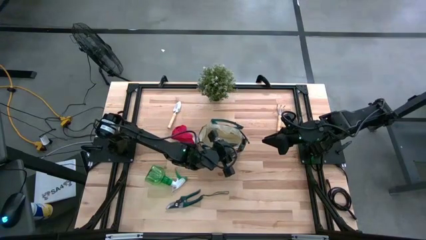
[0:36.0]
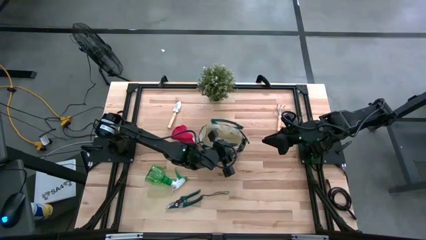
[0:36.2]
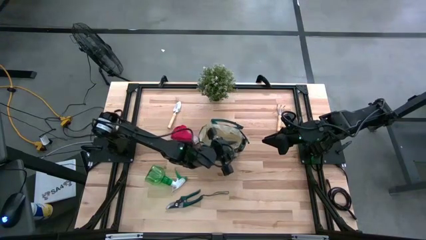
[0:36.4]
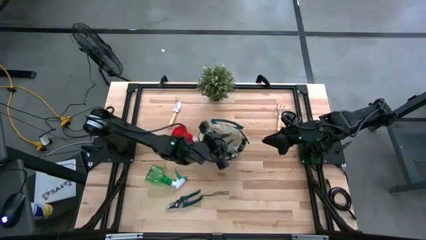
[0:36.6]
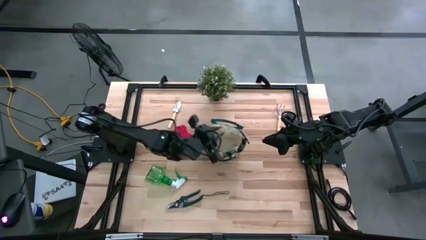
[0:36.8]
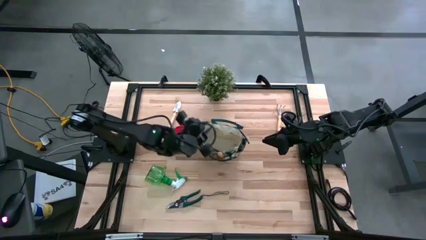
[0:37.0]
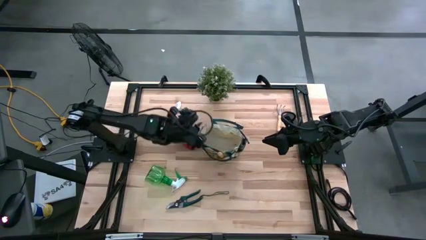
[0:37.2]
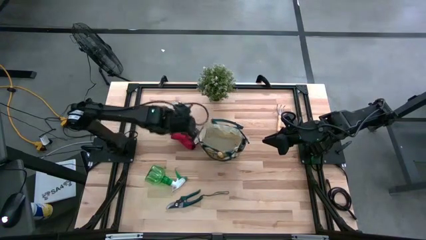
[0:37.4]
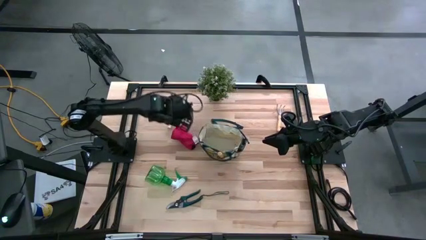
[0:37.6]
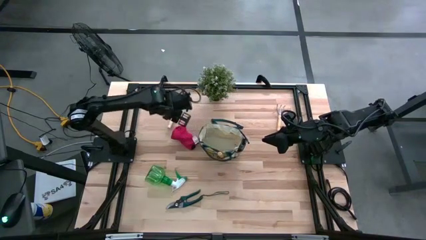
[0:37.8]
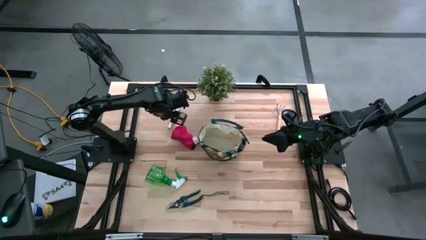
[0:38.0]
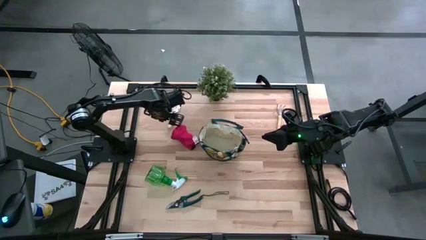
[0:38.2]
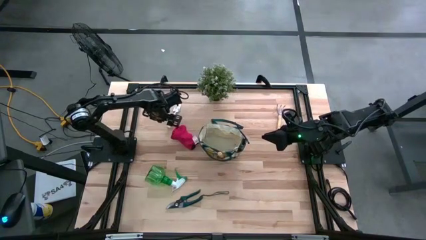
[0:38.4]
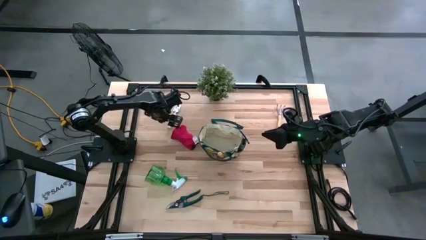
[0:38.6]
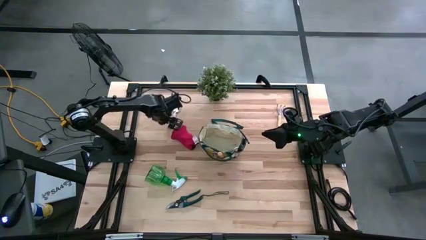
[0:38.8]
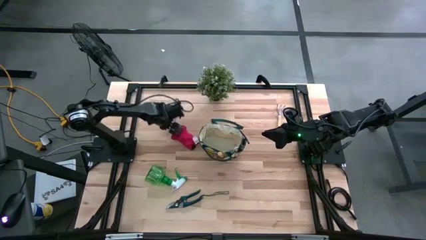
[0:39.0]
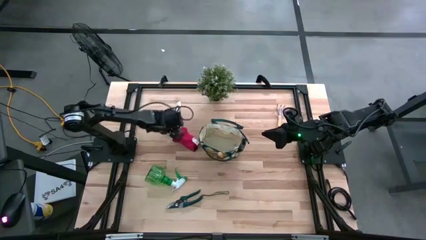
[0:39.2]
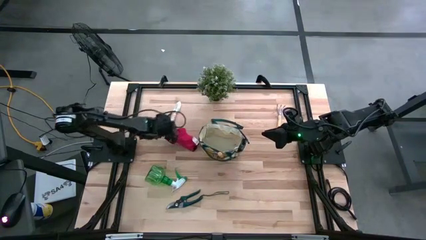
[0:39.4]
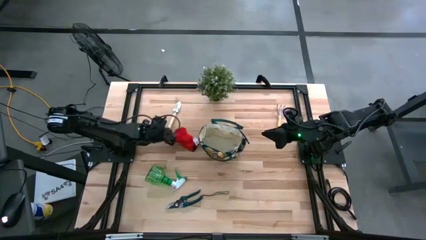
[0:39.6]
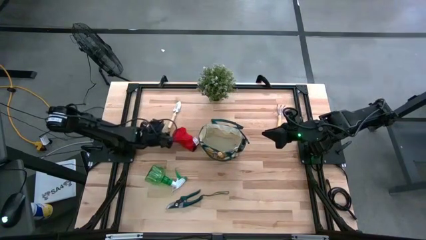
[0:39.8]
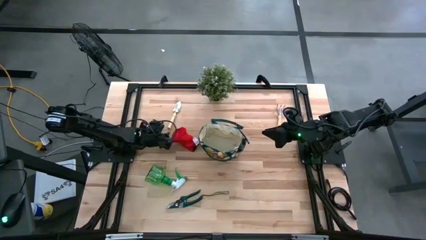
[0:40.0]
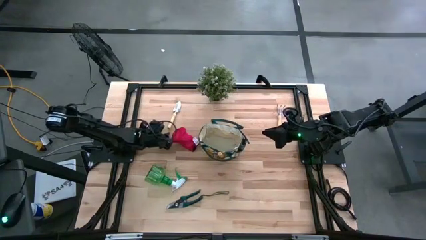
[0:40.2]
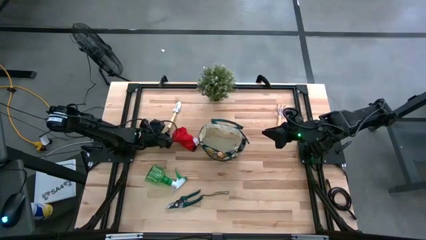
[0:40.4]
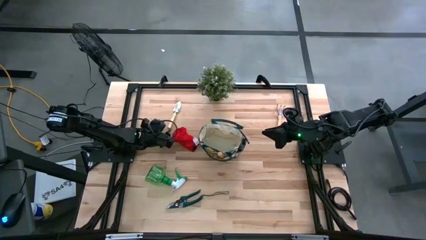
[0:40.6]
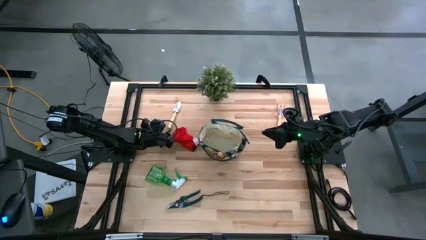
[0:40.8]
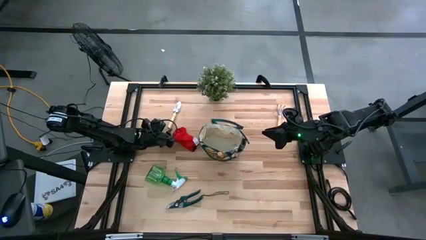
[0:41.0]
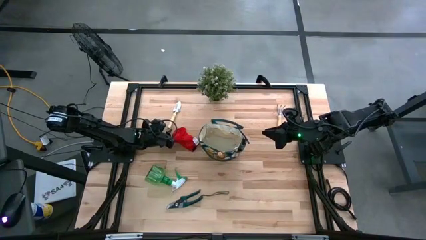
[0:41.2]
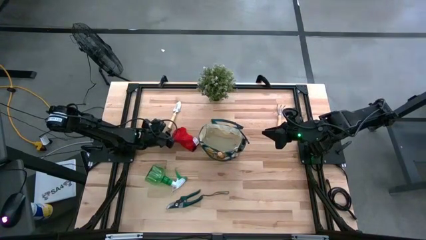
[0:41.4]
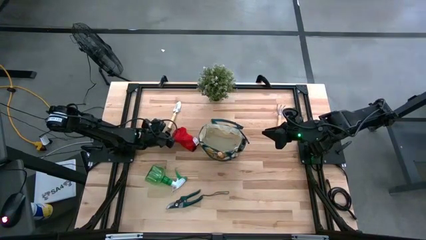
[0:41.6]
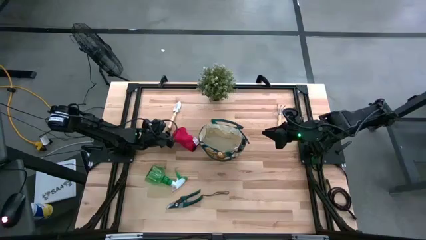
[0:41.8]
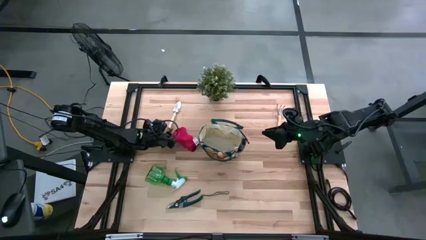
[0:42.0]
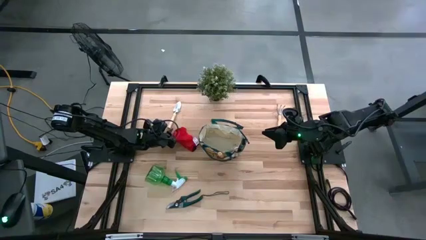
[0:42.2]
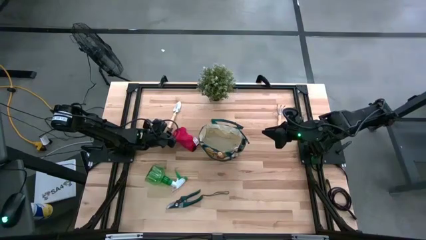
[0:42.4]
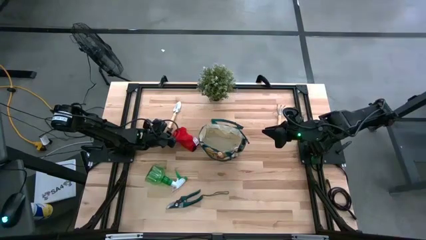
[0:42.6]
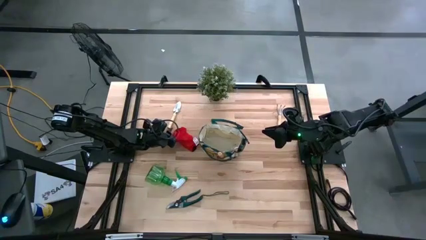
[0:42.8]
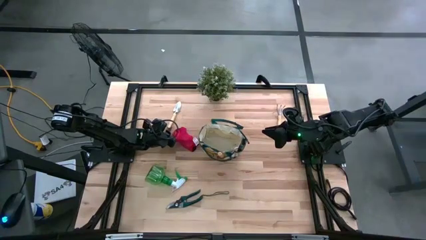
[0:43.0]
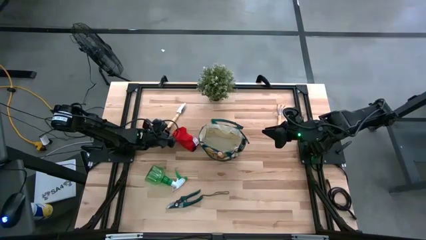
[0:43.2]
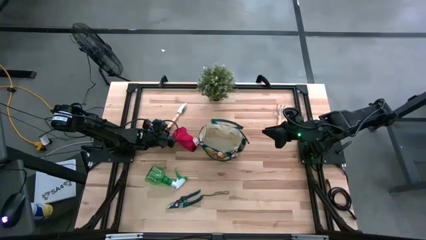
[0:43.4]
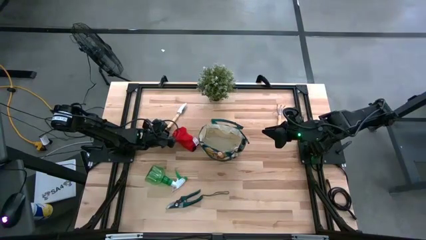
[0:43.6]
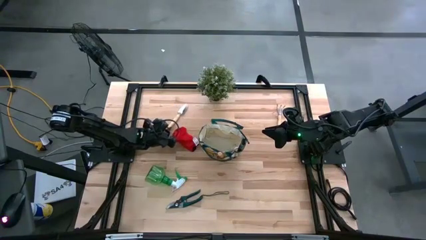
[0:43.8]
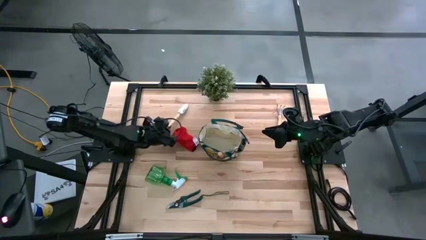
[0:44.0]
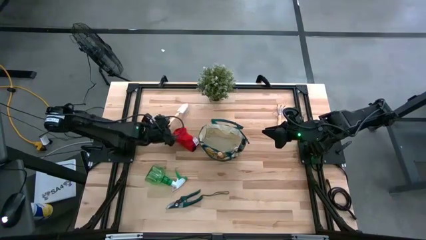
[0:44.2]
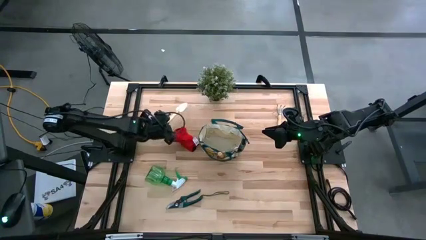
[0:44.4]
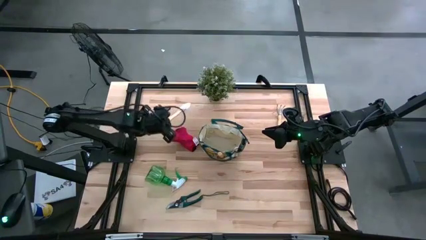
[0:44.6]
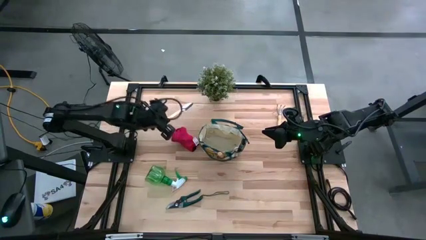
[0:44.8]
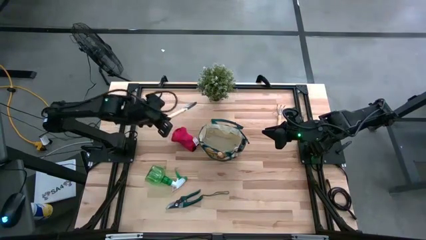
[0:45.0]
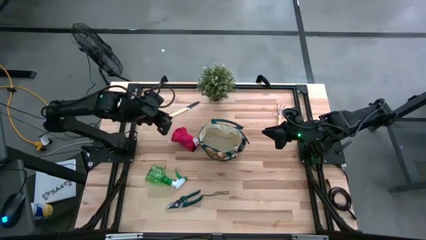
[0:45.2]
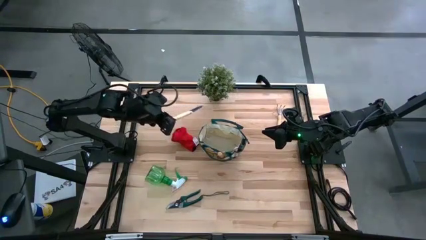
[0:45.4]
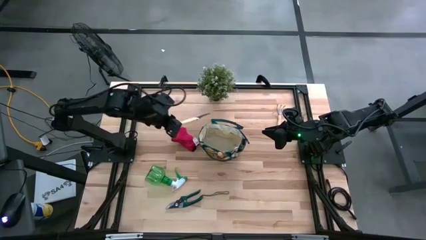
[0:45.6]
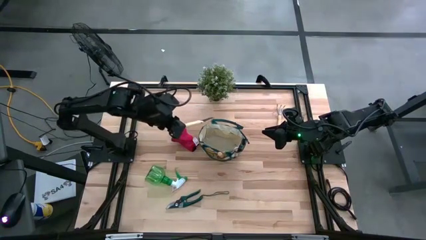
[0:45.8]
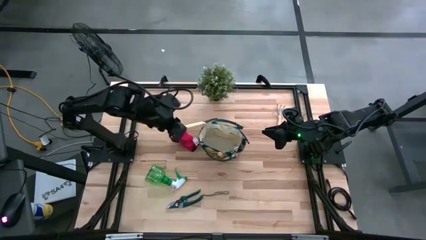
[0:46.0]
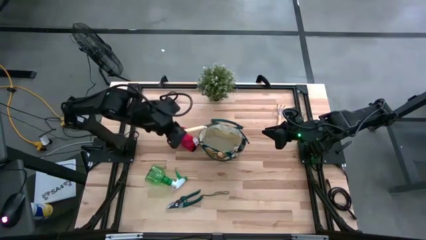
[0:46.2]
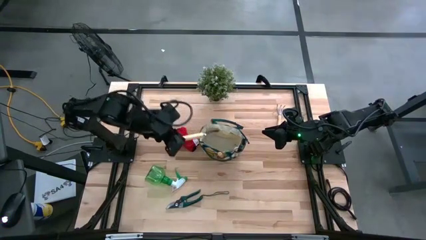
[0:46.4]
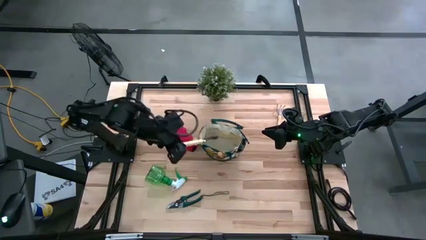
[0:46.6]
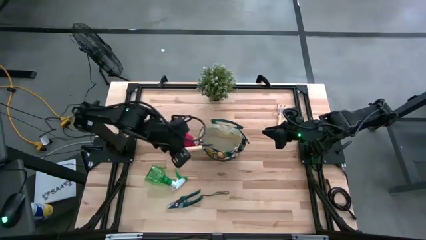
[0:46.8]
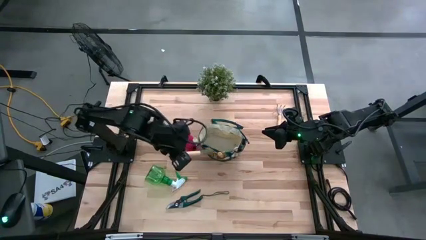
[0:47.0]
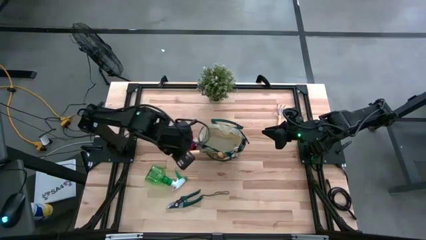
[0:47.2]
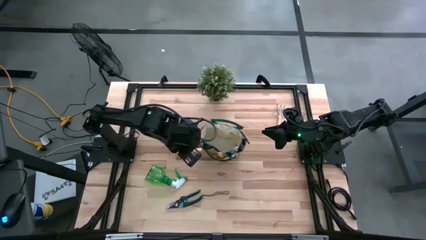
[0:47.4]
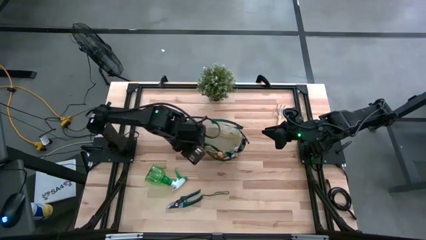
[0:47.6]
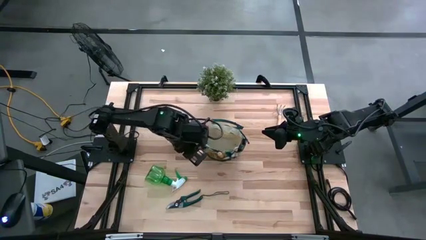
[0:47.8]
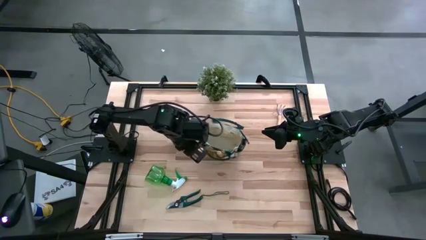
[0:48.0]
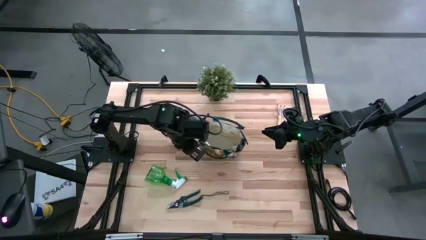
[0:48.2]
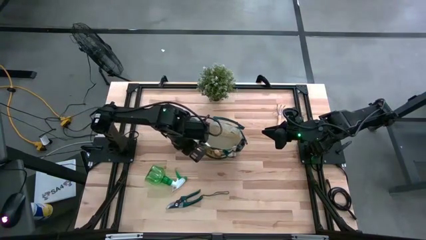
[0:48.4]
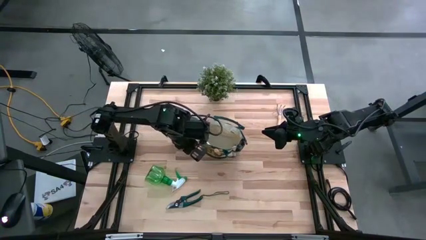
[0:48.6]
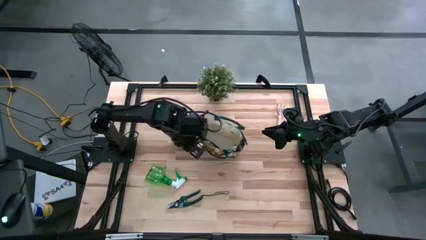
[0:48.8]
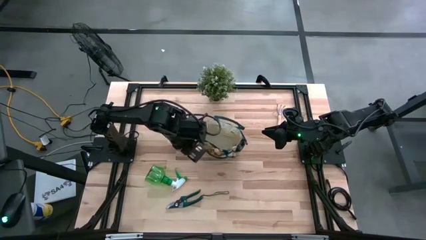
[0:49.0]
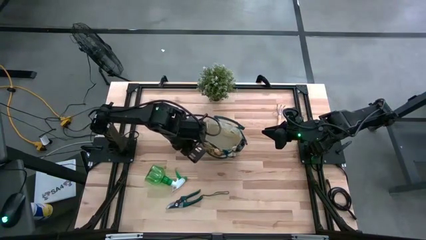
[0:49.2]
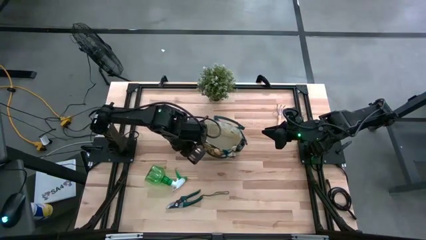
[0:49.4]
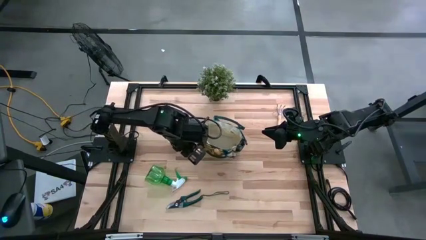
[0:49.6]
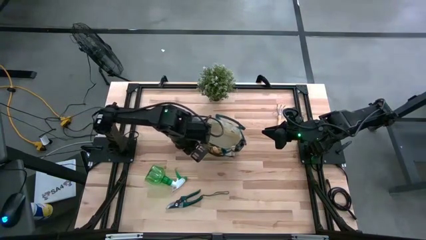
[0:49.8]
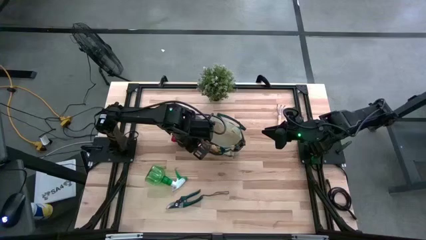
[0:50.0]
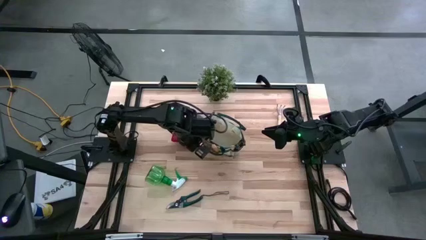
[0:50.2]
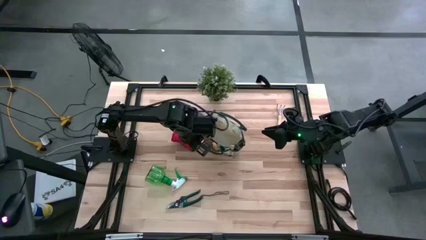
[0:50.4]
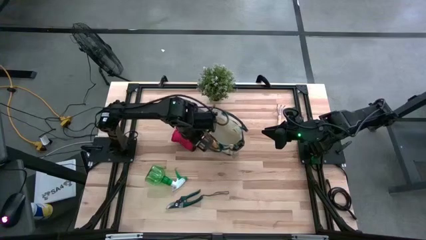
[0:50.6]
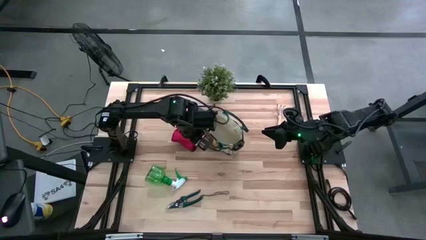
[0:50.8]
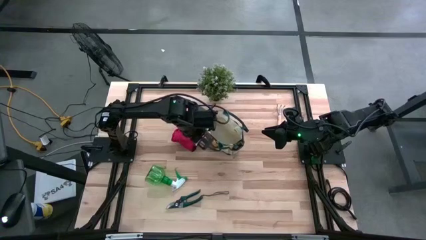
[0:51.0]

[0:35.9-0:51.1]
Task: Pick & Place Garden tools in Gardening bag
Put the trowel into the gardening bag
